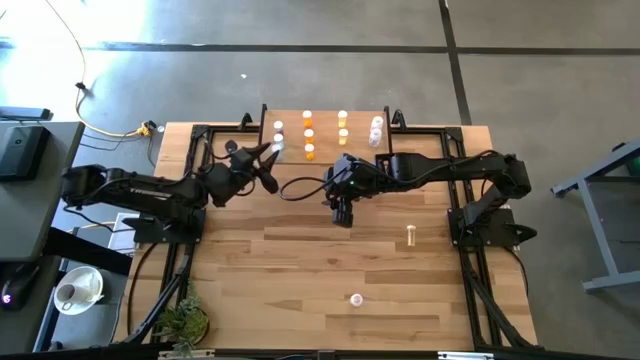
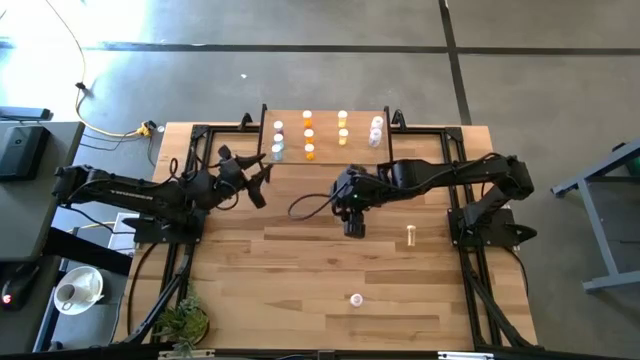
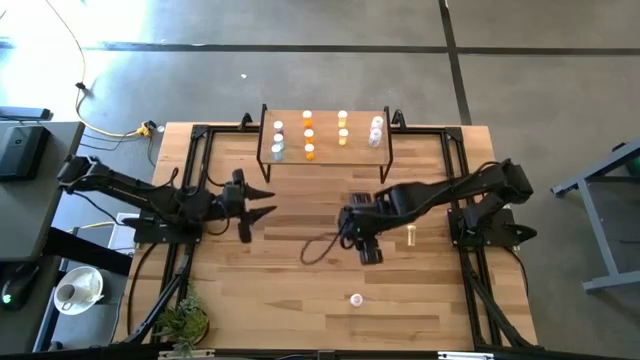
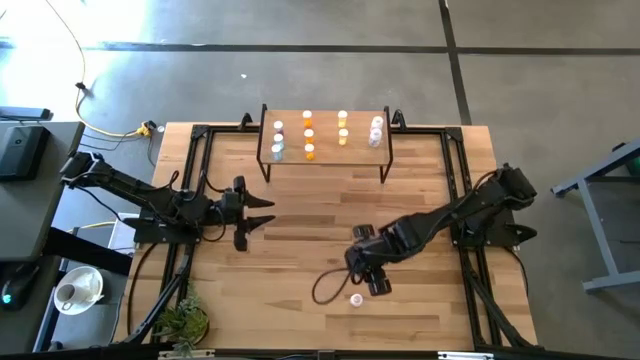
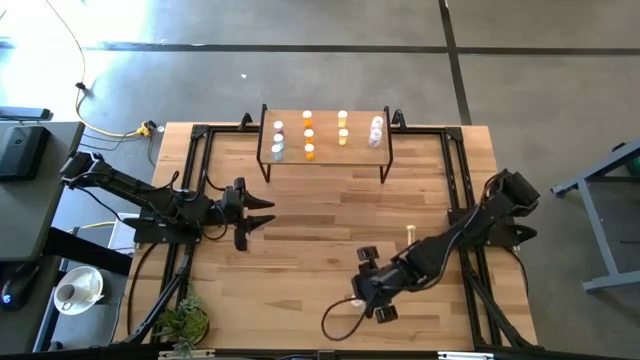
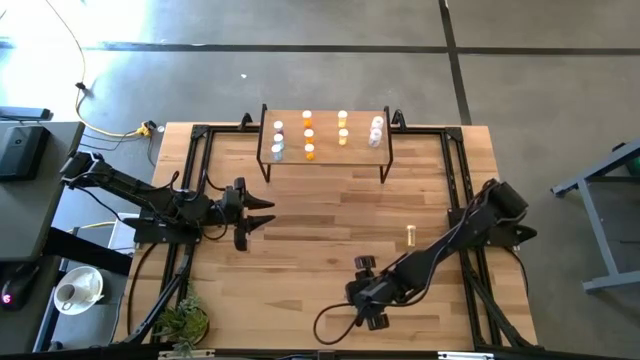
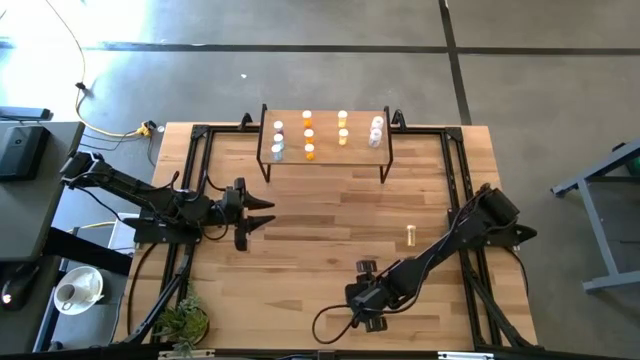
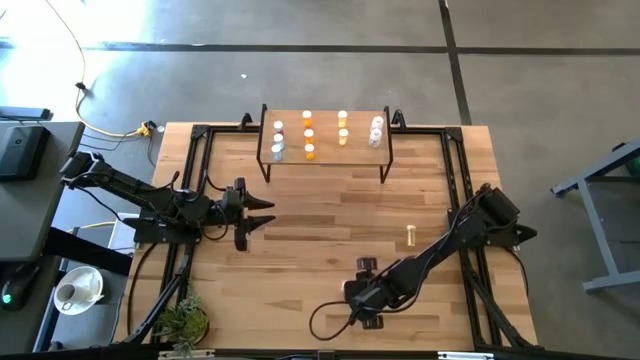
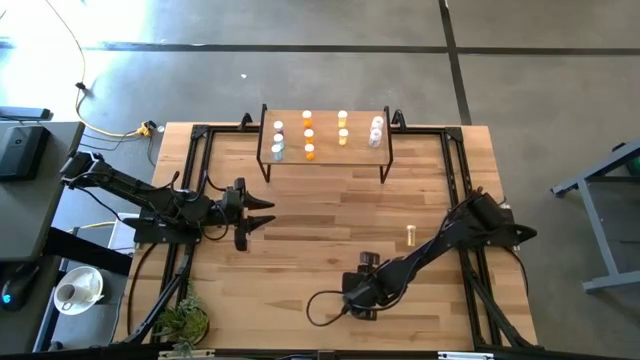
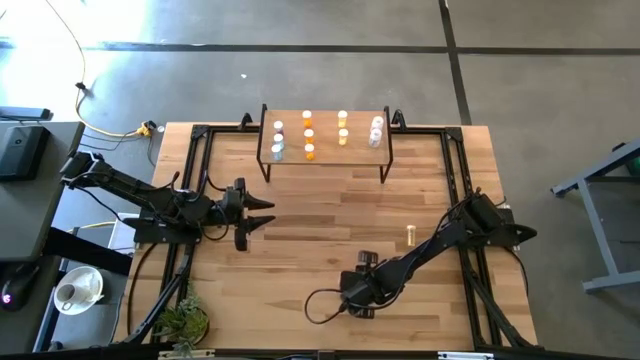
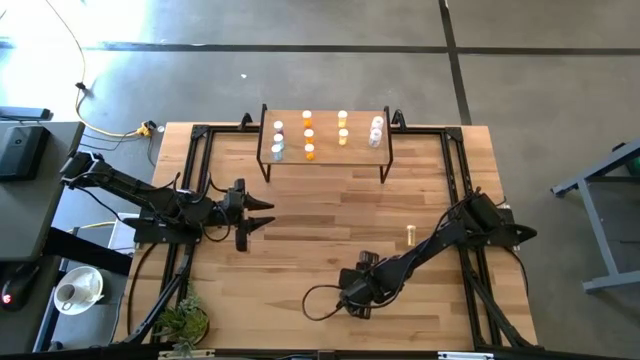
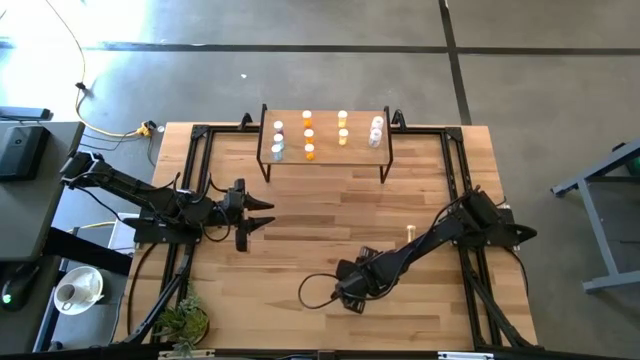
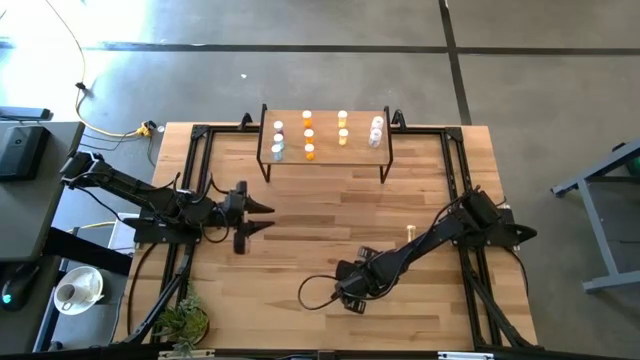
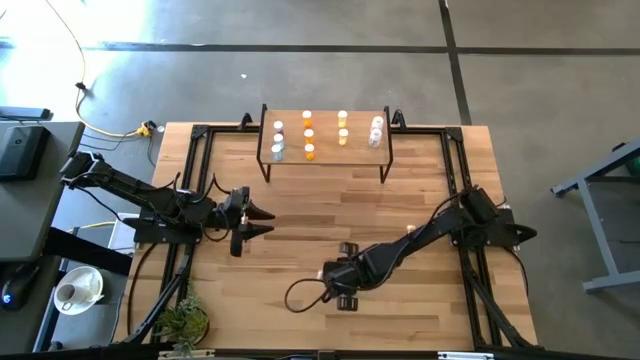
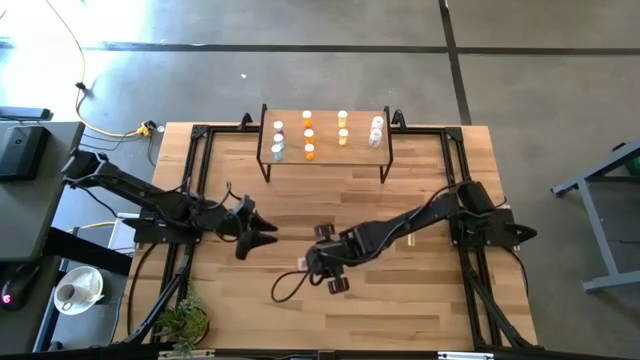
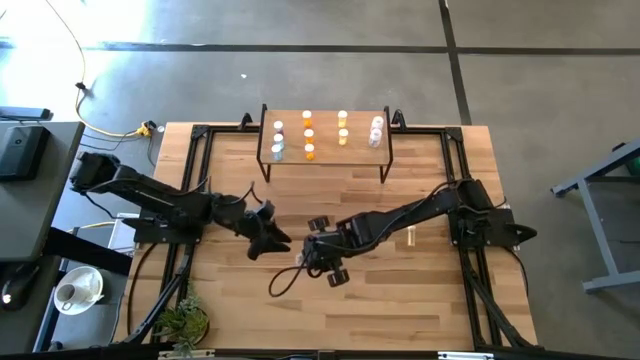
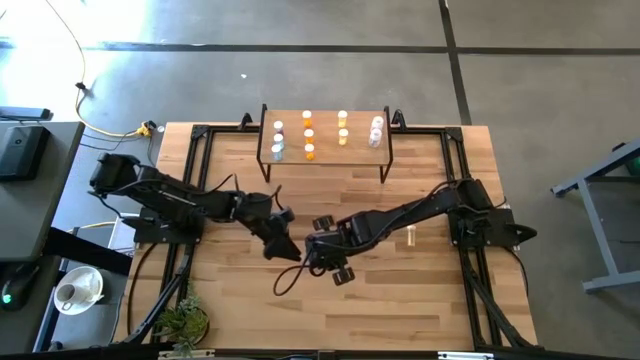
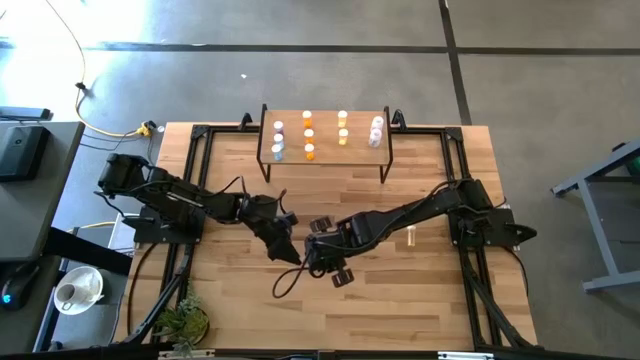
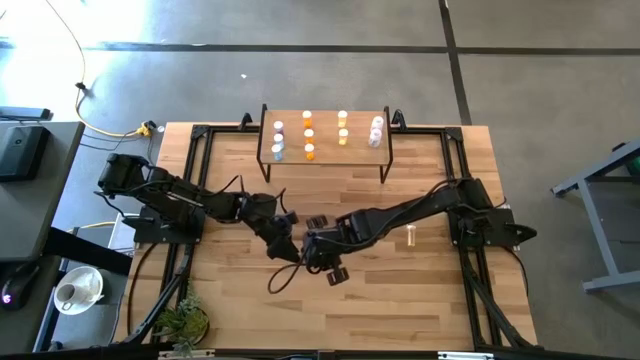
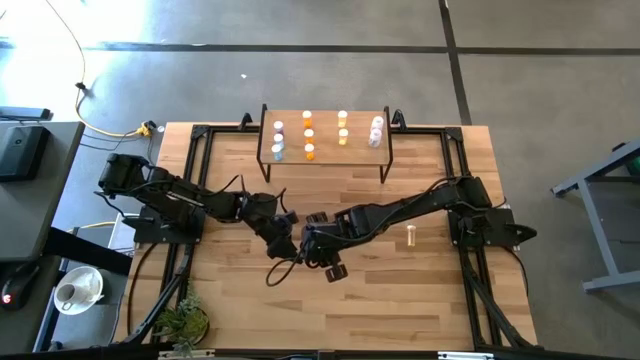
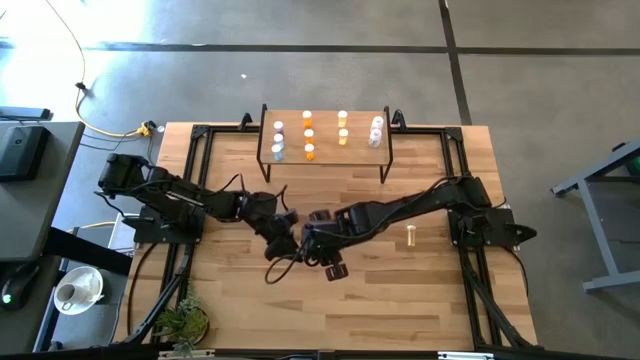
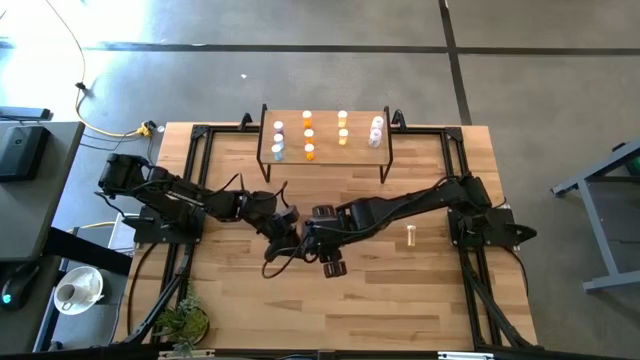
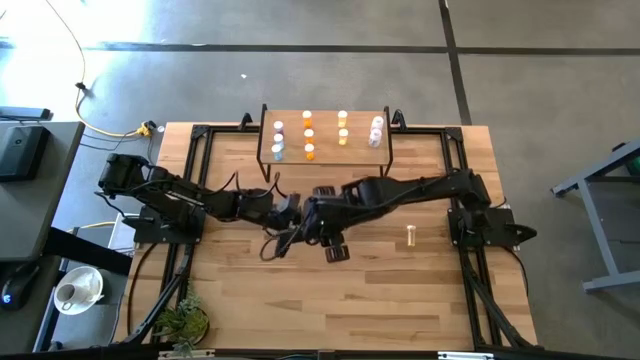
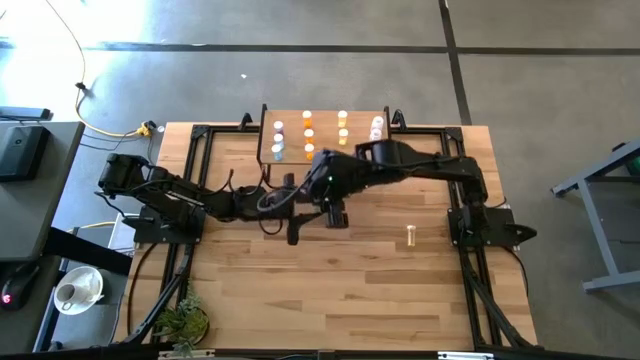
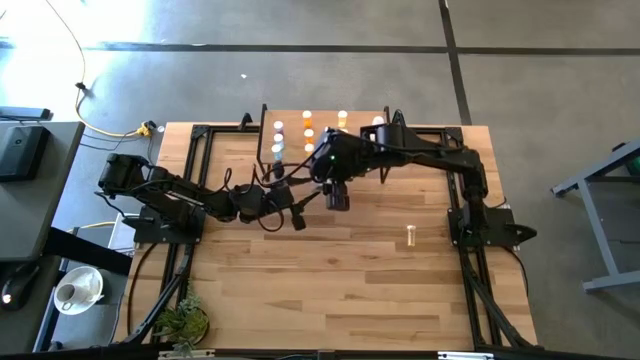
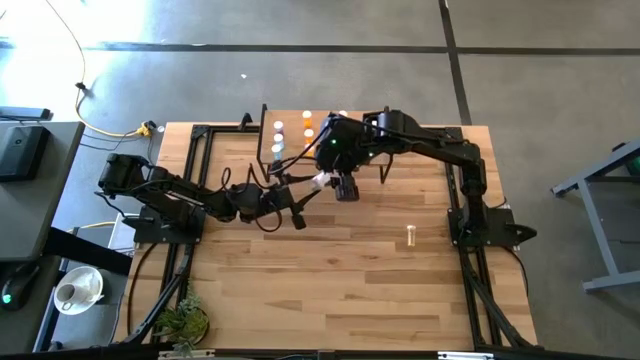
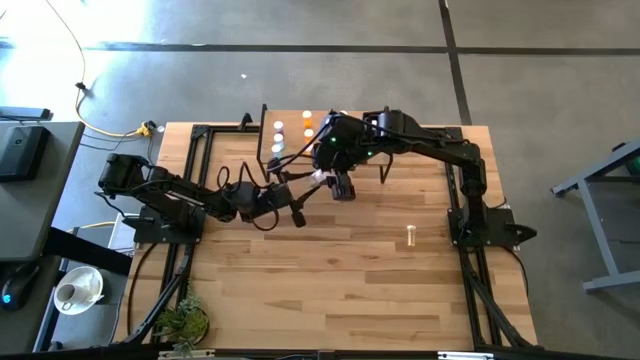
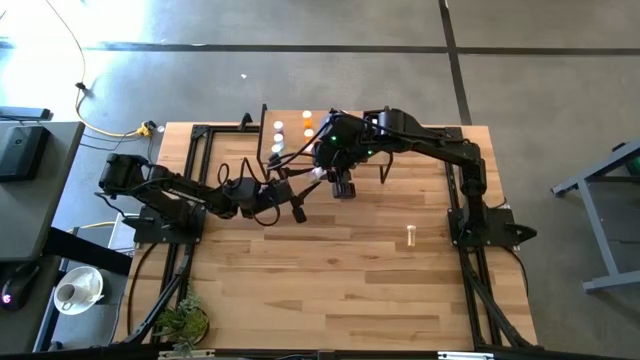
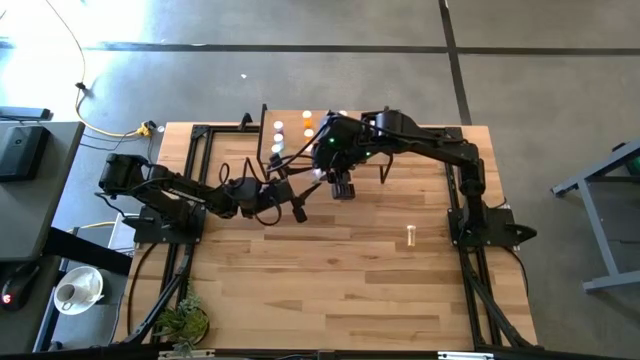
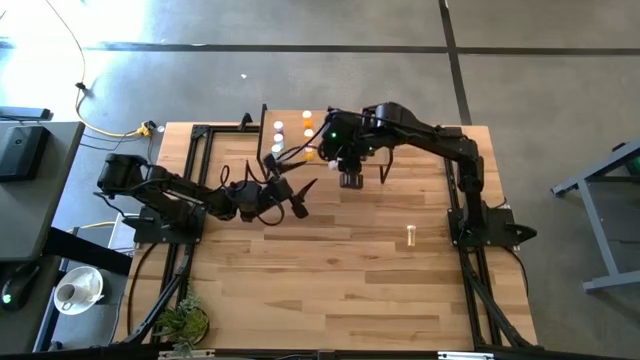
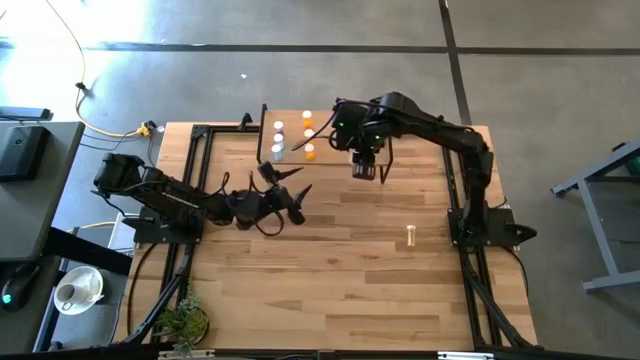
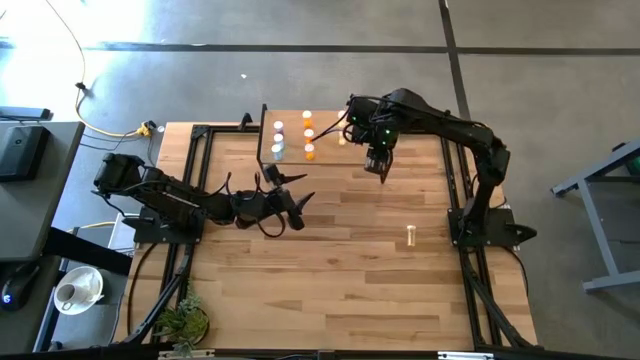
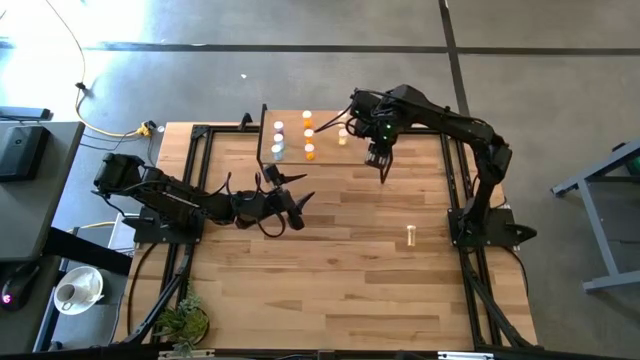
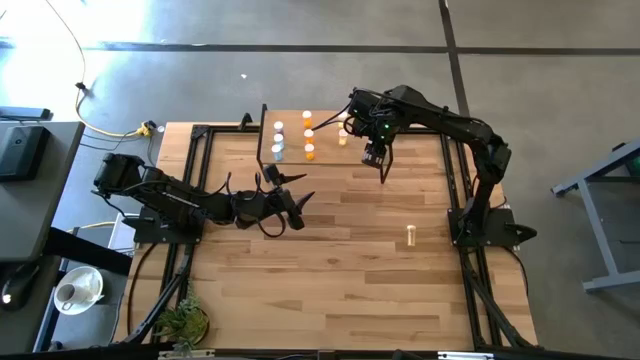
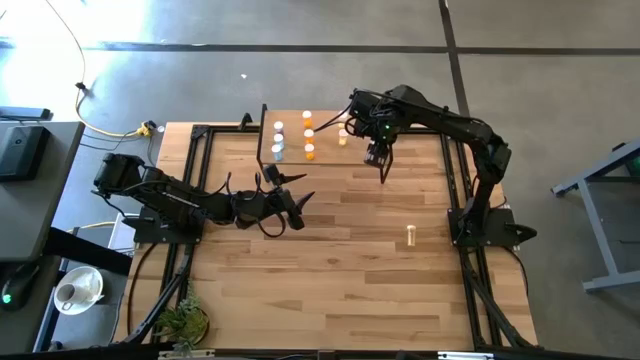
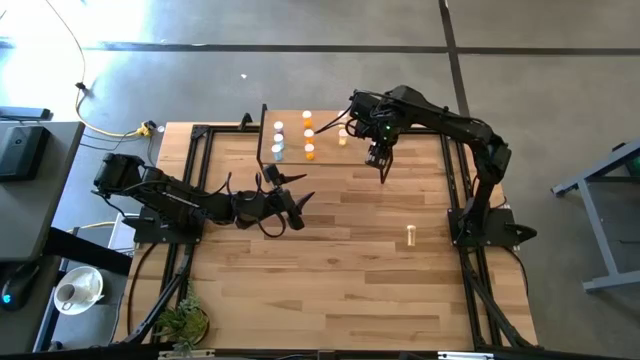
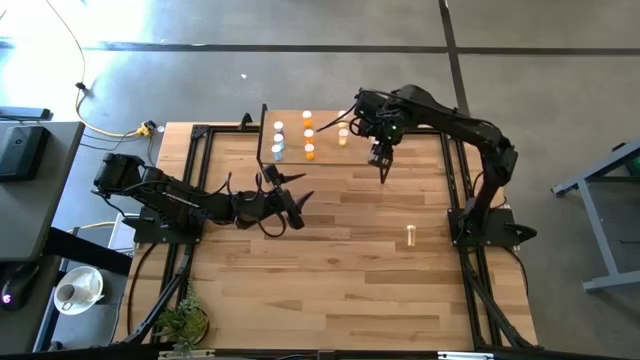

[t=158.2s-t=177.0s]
Task: Pick and place medicine bottles onto shelf by color
Put the white pill bottle on the shelf aligned with the other white pill bottle

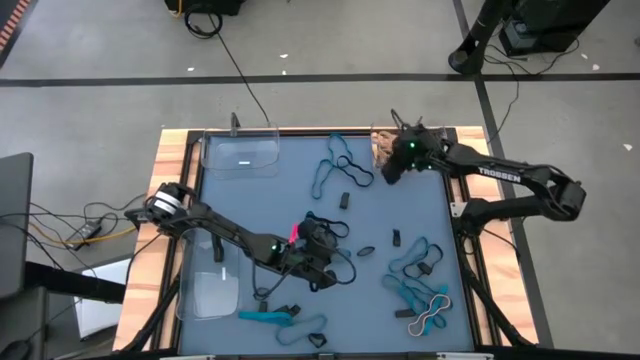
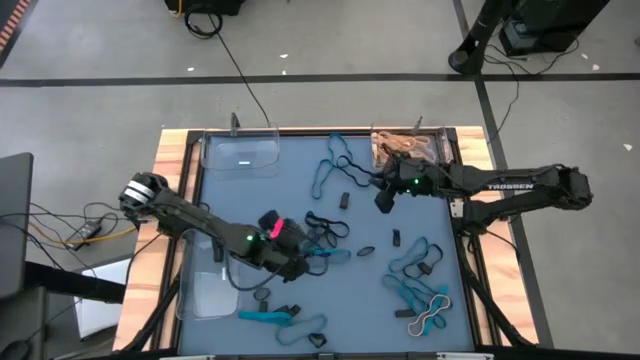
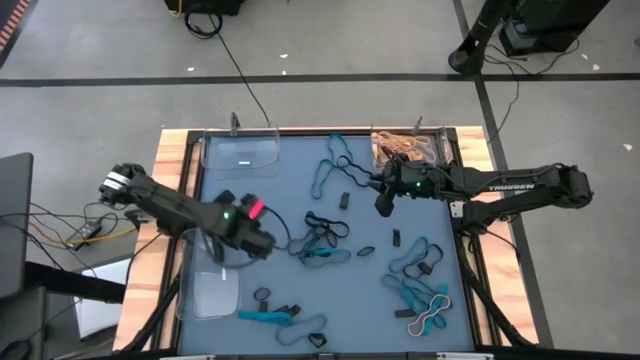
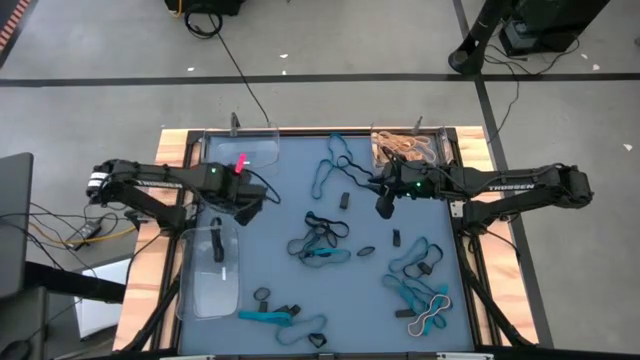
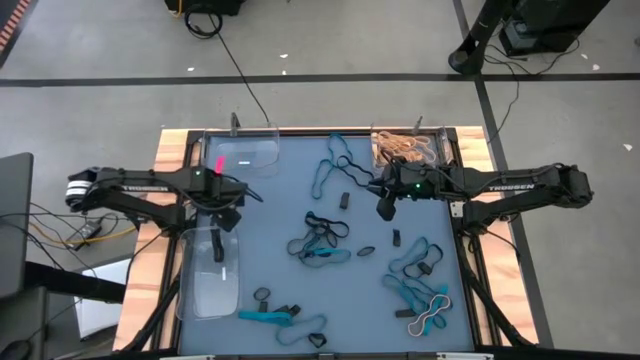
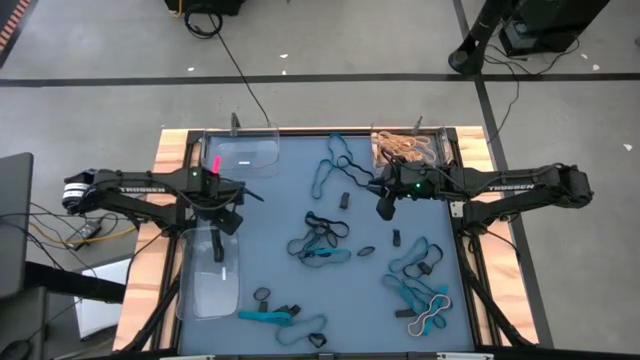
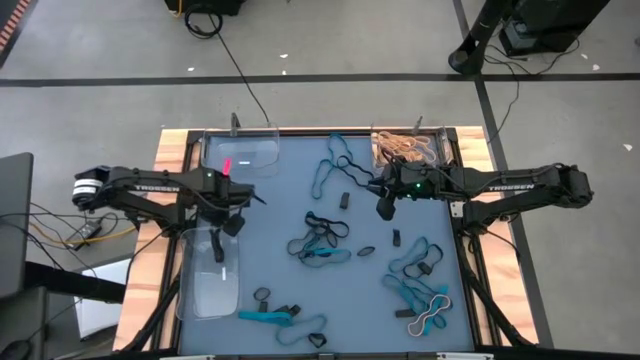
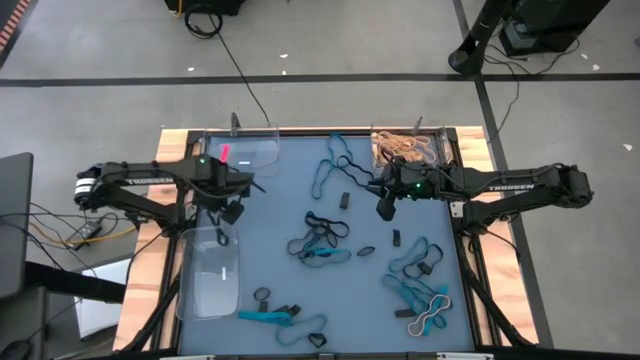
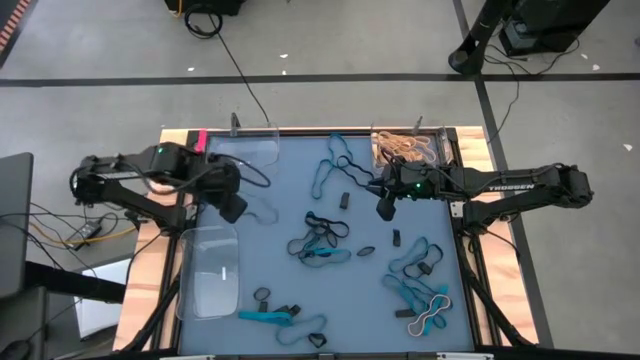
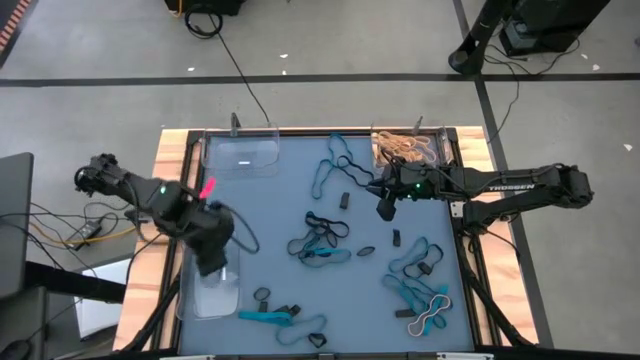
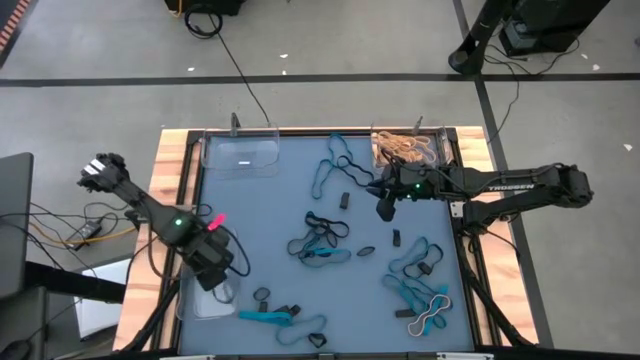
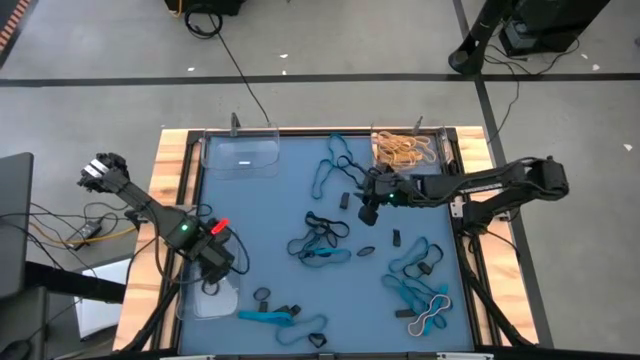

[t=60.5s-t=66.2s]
Task: Sort rubber bands into baskets
Put the big black rubber band into the bottom left transparent bin
